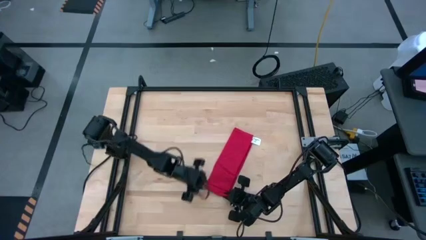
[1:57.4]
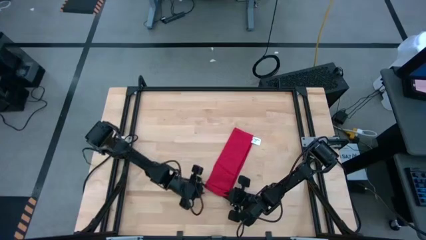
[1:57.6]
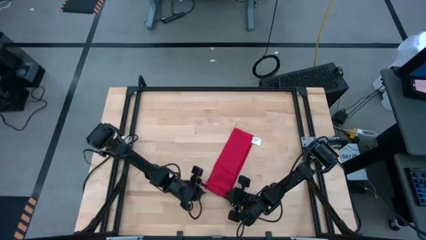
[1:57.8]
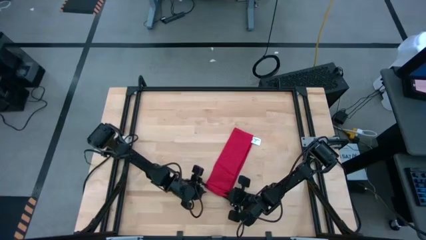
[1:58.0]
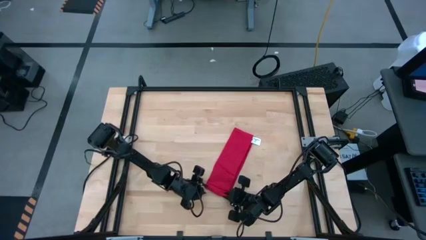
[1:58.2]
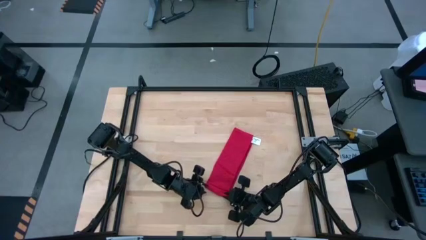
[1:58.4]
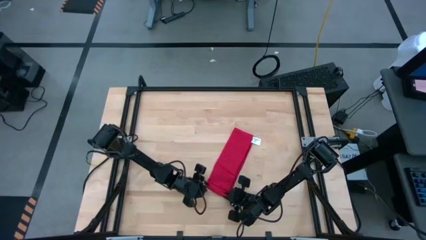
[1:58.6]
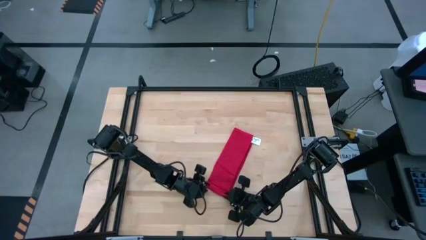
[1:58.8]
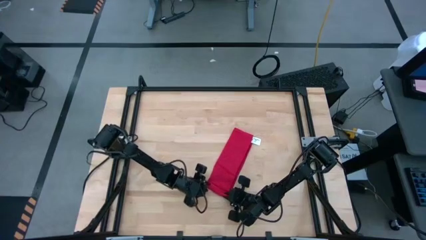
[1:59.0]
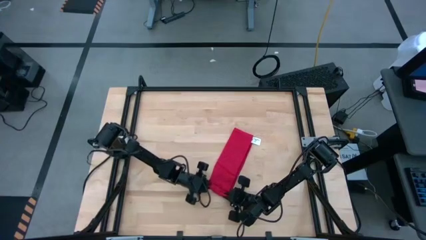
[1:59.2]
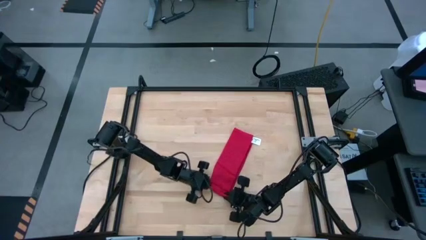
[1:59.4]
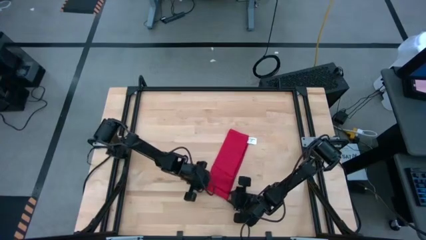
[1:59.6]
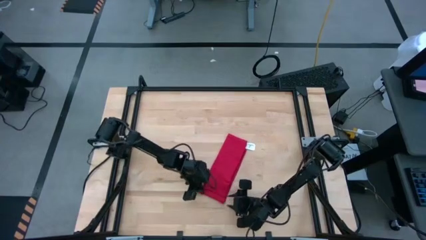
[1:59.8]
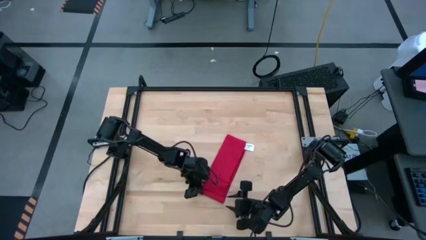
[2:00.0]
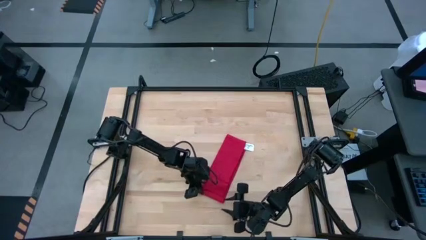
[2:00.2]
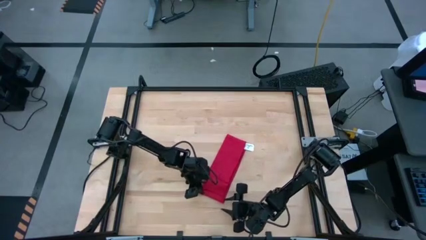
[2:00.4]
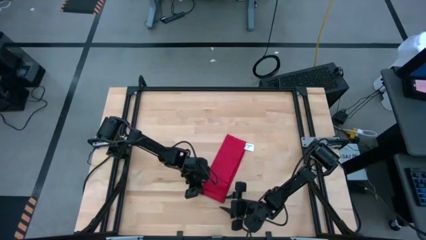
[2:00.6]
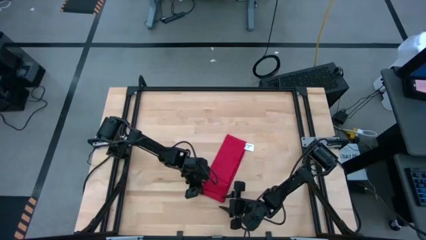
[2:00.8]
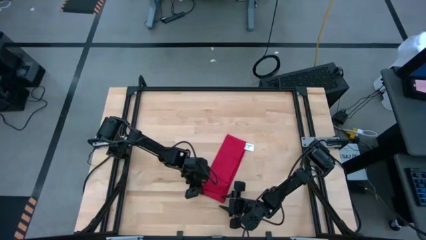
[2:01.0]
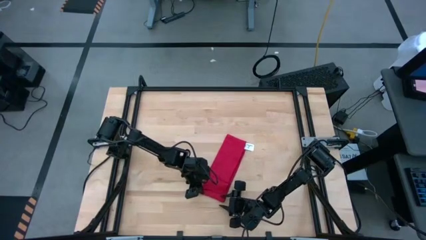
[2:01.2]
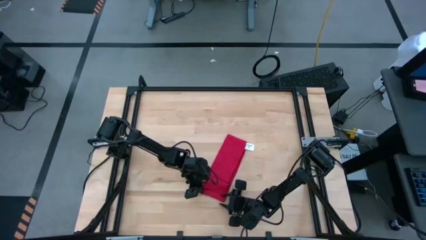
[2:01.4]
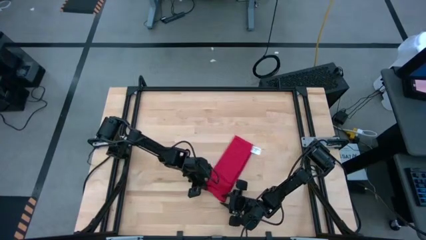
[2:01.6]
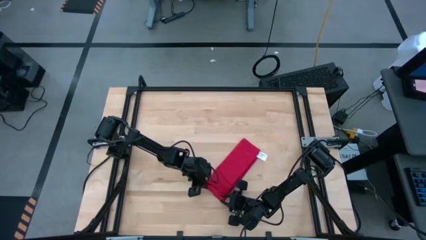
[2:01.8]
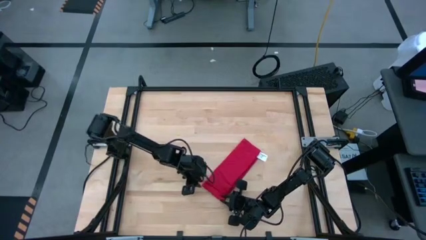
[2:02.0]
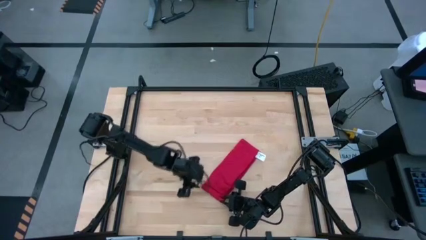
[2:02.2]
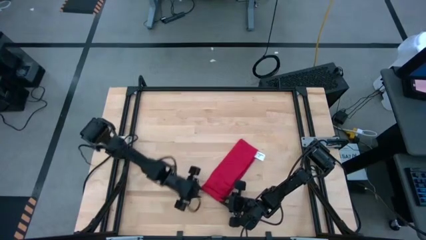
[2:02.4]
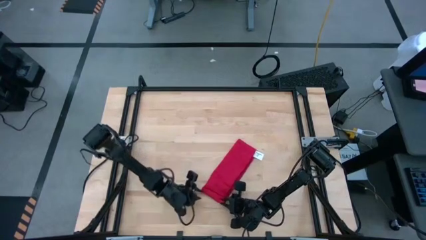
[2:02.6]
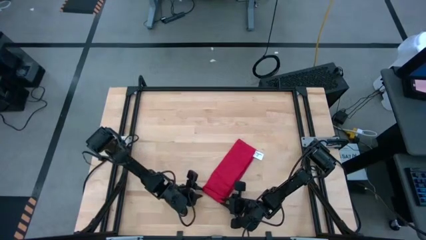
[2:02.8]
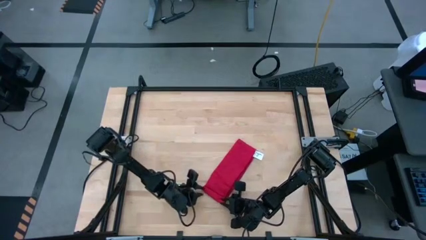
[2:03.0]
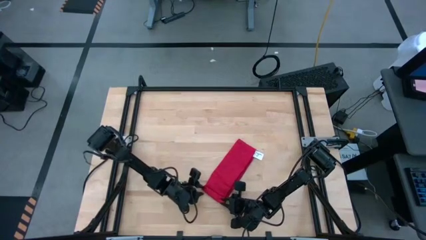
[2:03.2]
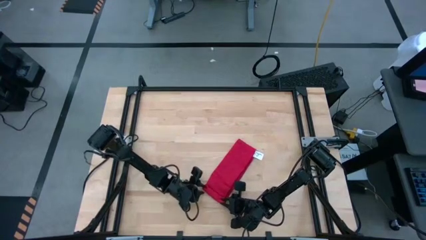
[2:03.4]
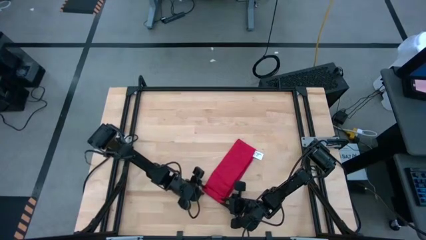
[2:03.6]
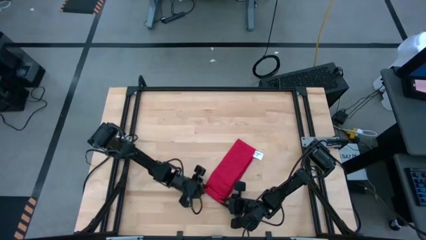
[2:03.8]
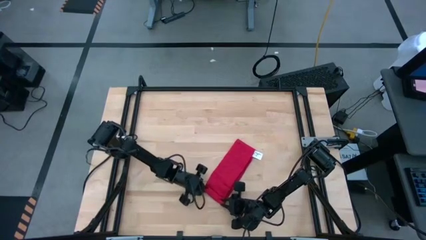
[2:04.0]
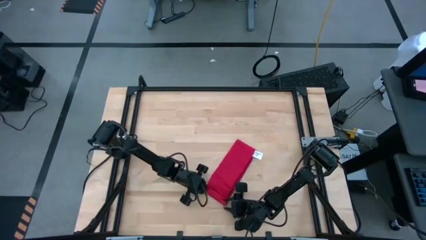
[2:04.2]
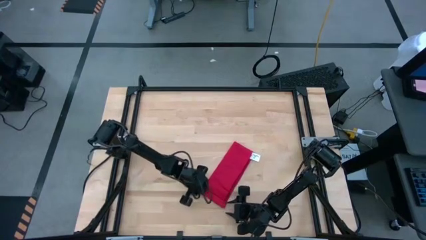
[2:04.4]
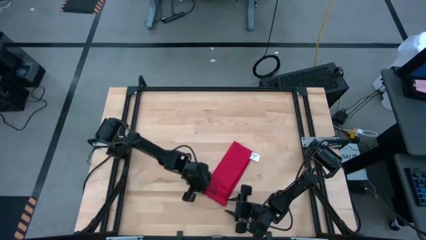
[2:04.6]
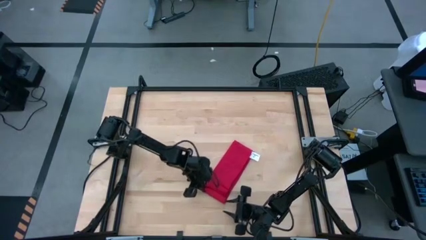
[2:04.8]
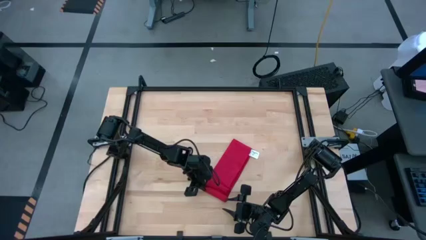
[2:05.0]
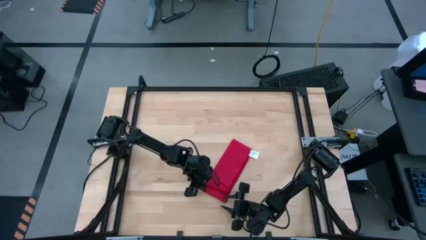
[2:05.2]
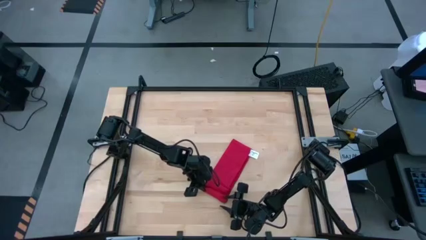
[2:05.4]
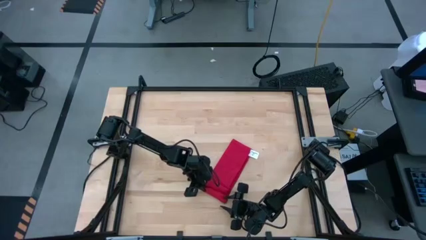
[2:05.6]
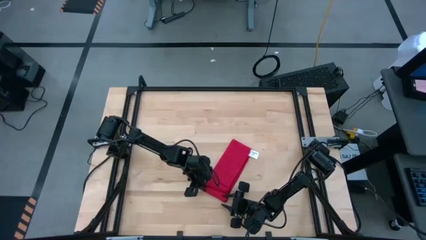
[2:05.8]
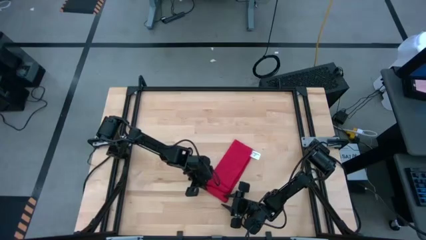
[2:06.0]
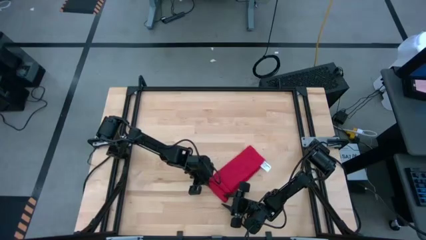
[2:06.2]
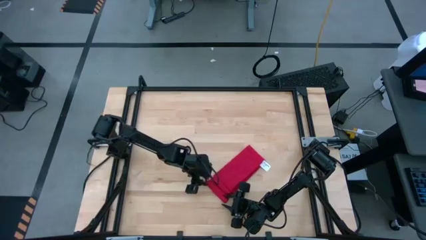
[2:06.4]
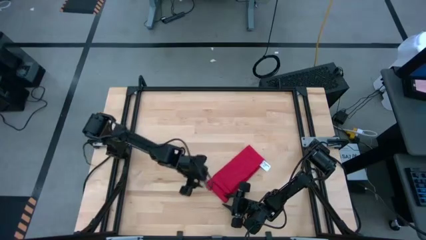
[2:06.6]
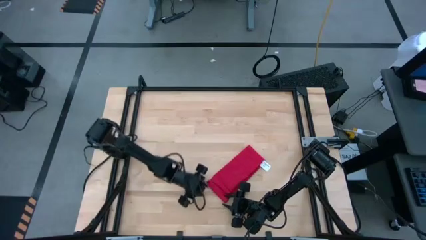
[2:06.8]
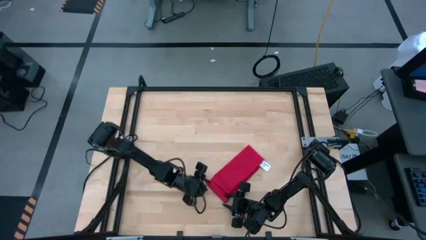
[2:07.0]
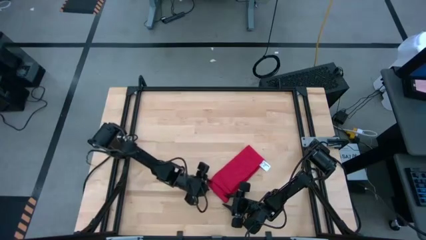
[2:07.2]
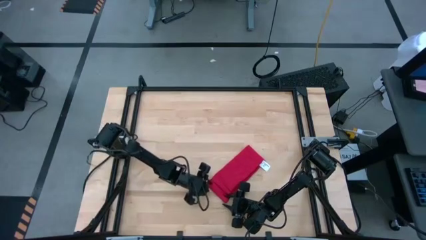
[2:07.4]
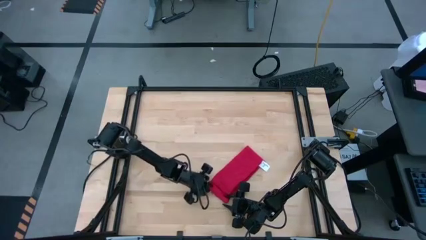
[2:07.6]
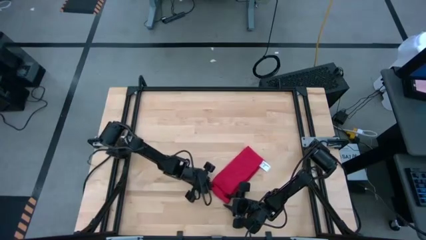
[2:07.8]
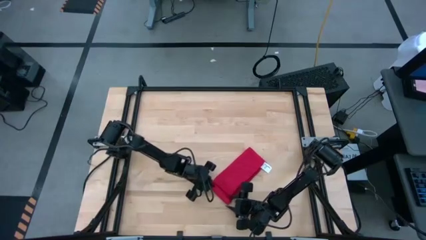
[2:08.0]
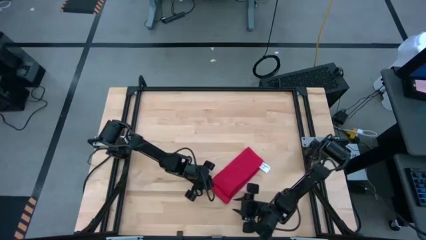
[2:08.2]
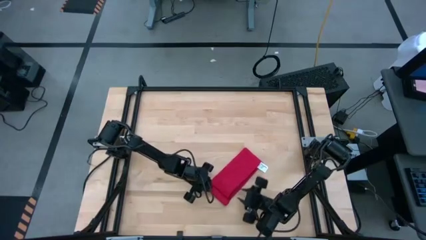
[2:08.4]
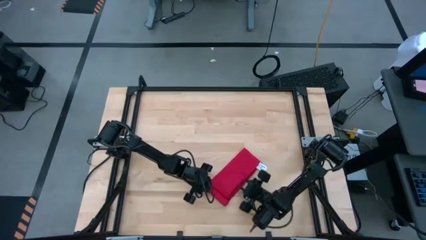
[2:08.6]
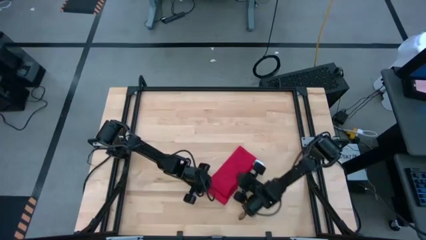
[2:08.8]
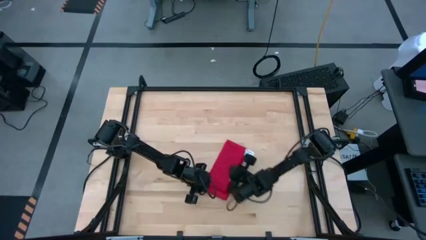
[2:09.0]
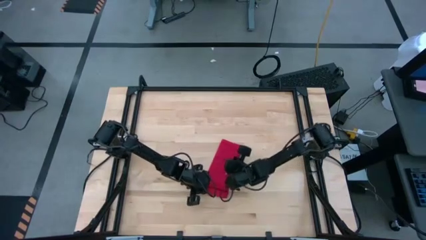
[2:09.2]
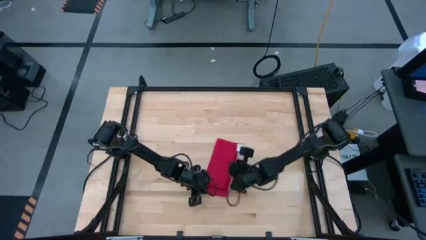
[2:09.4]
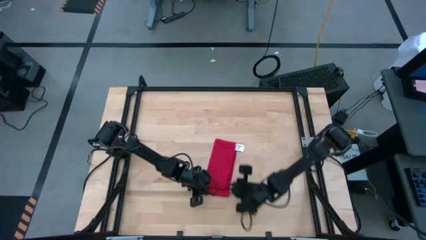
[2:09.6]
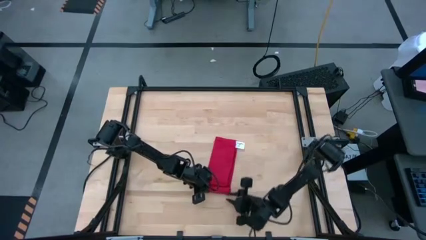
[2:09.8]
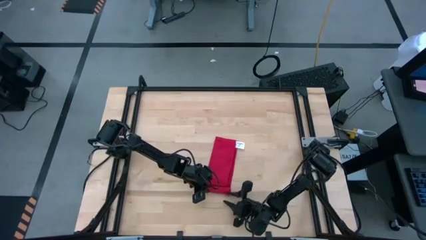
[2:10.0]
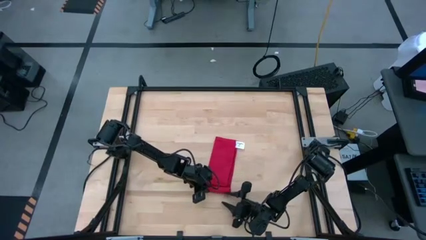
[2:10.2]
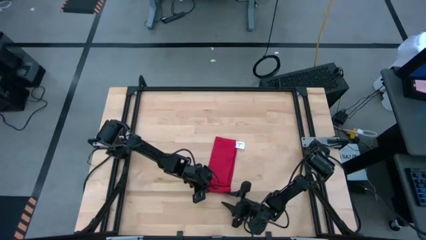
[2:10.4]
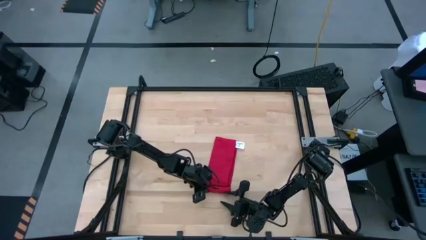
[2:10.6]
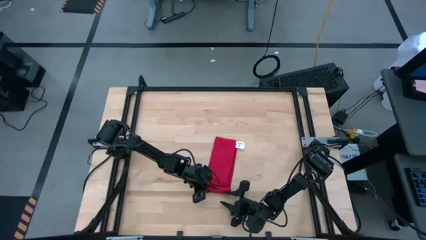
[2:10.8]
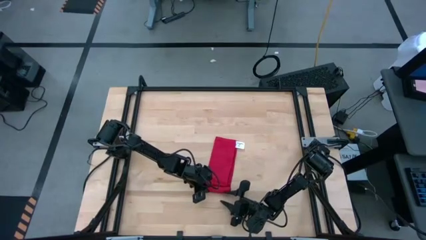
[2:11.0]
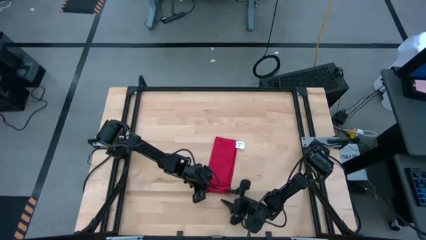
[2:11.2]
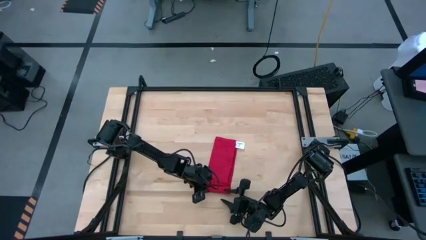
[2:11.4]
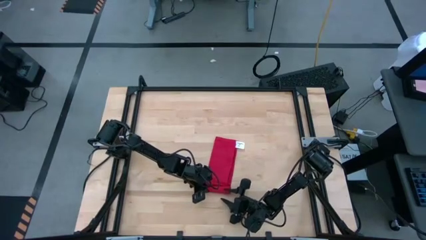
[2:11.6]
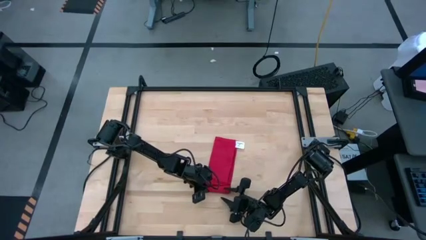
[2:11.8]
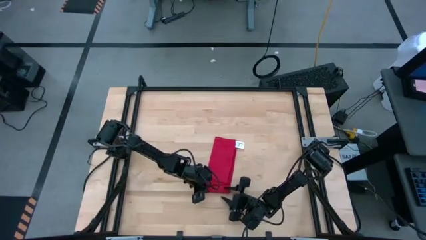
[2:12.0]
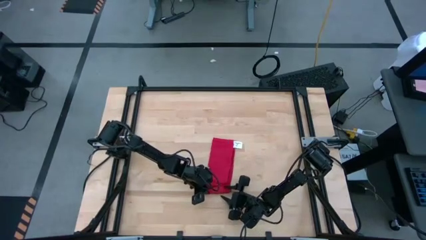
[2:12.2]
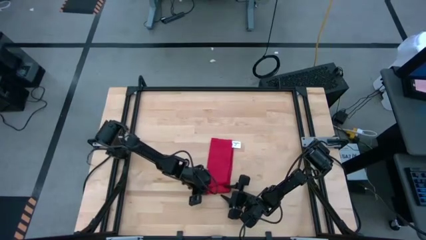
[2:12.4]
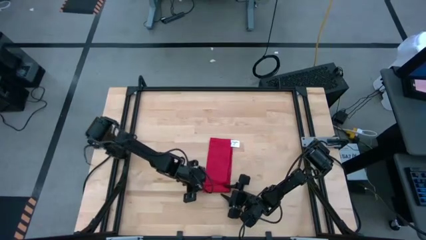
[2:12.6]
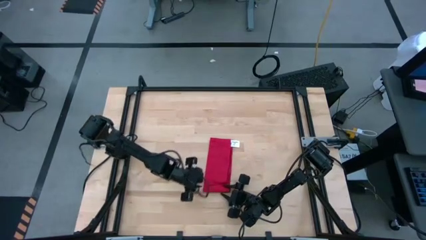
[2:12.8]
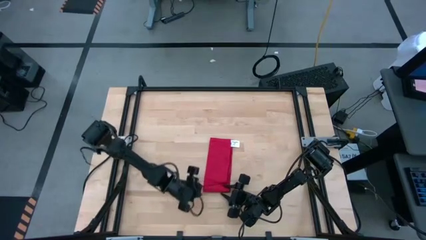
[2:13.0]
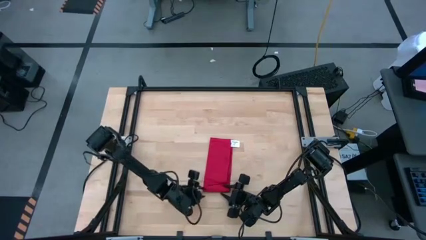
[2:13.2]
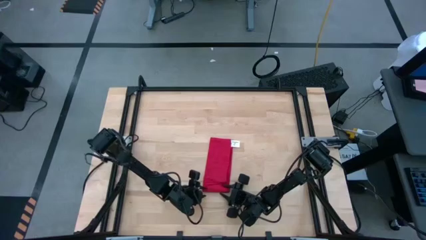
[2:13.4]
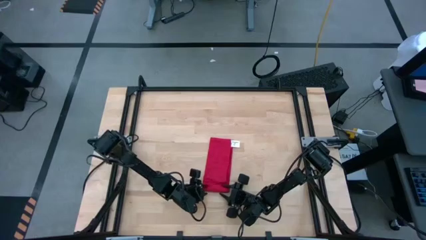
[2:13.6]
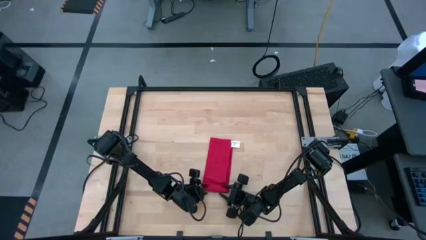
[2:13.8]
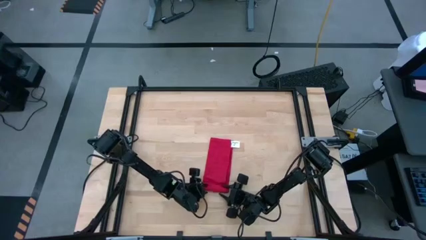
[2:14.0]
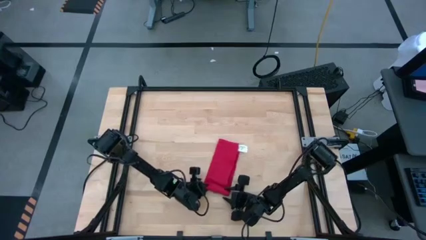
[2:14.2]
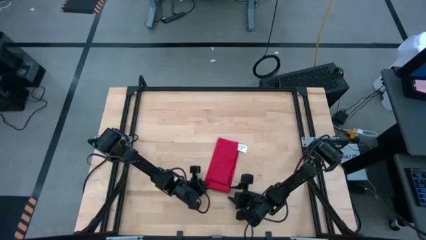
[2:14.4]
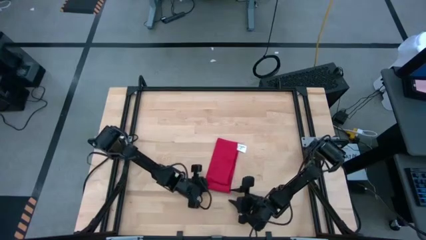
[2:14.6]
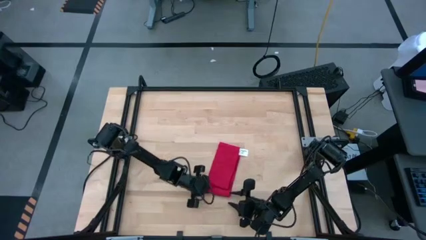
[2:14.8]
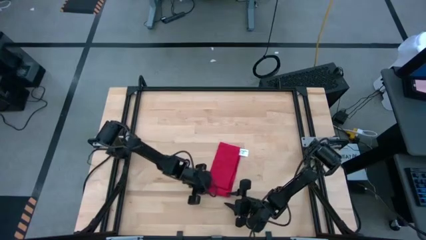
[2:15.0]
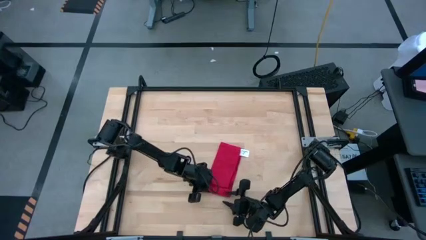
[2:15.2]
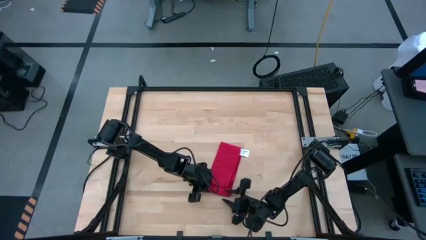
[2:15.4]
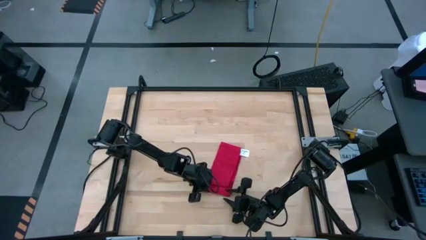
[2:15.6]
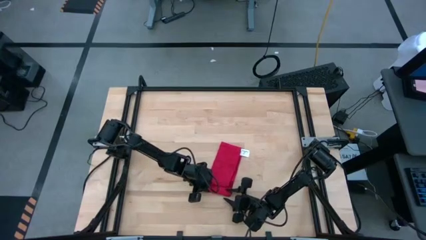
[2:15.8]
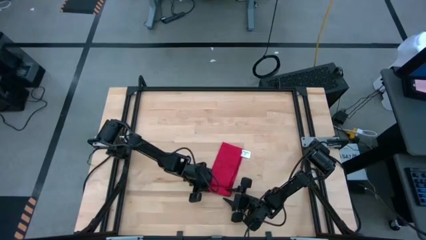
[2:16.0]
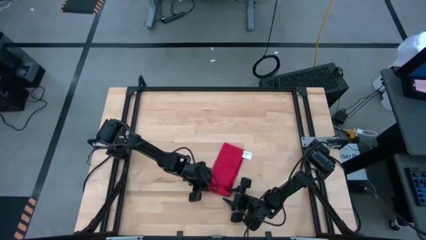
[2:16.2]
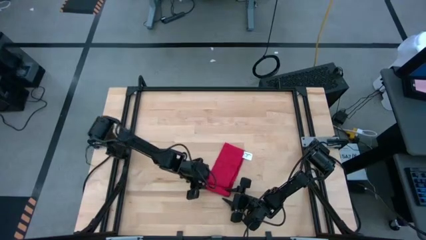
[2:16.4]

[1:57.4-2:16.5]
Task: Roll towel
Roll the red towel
